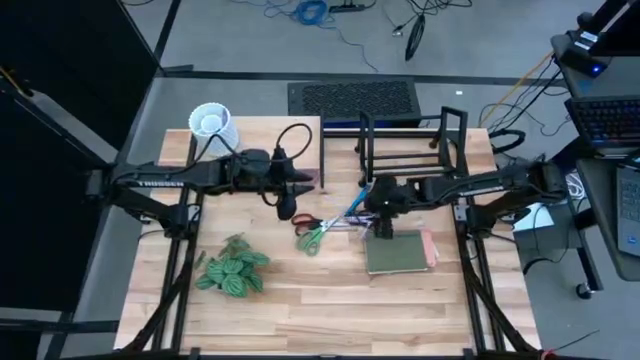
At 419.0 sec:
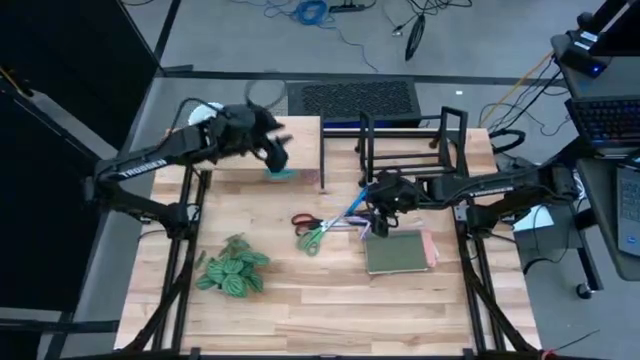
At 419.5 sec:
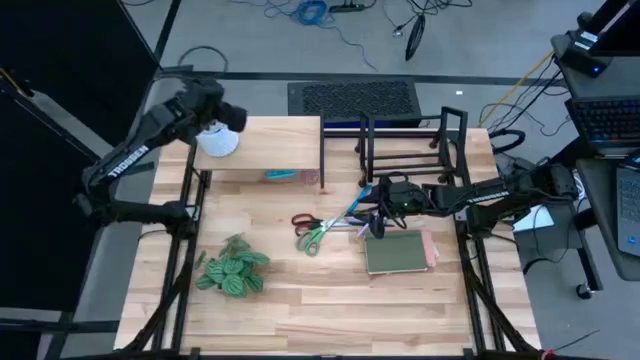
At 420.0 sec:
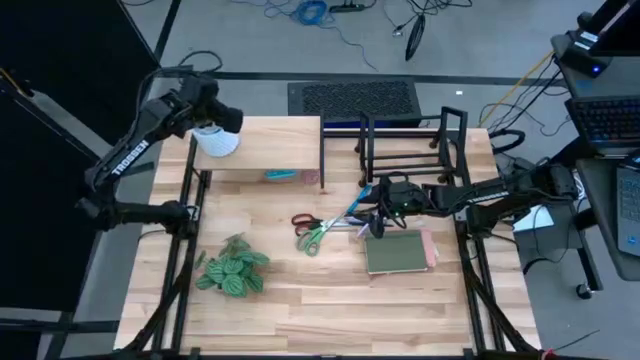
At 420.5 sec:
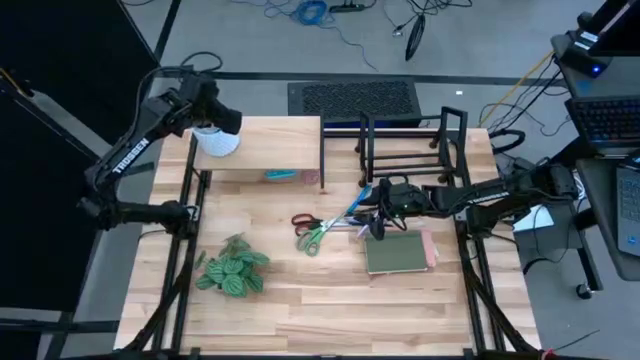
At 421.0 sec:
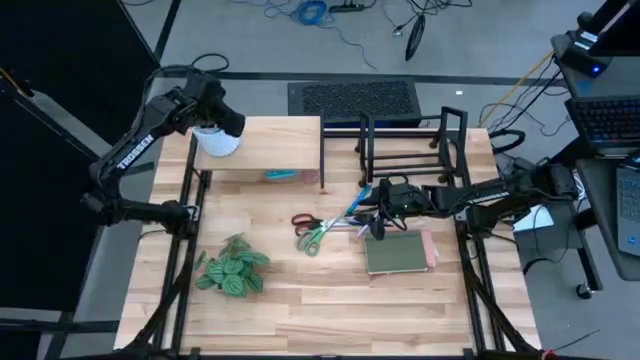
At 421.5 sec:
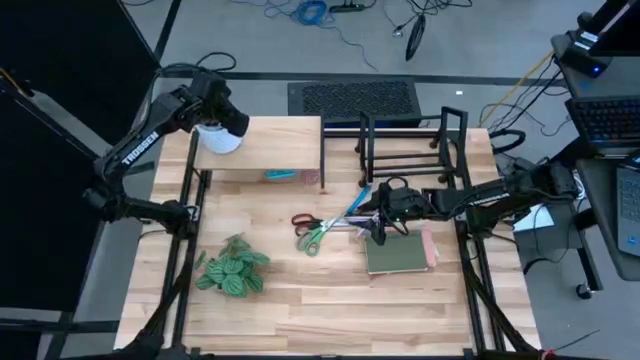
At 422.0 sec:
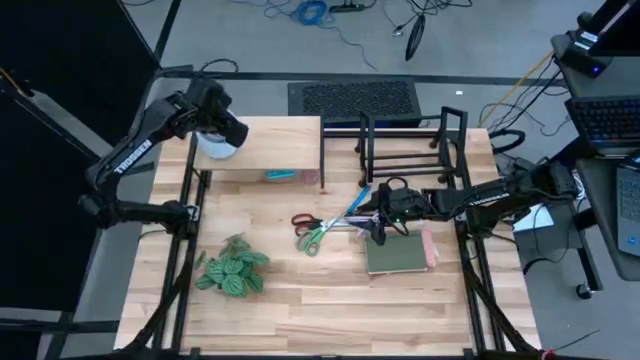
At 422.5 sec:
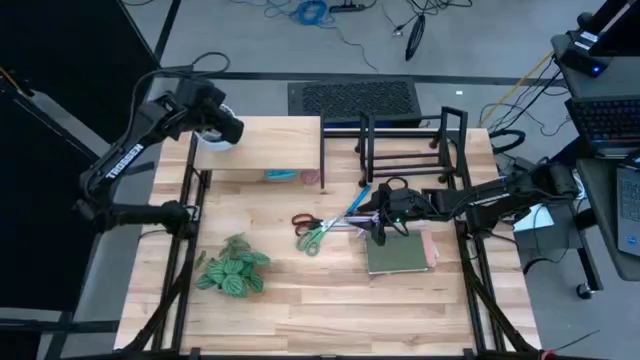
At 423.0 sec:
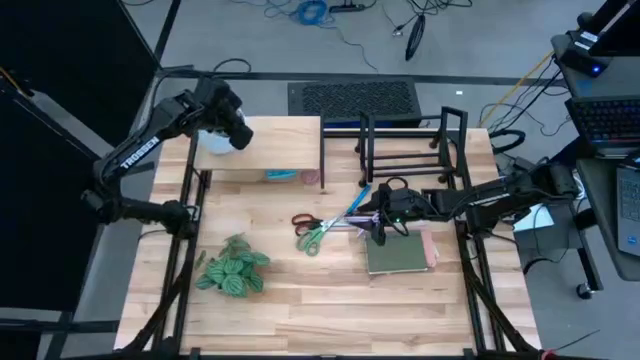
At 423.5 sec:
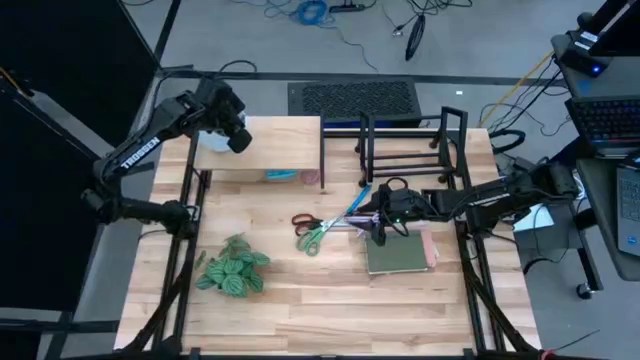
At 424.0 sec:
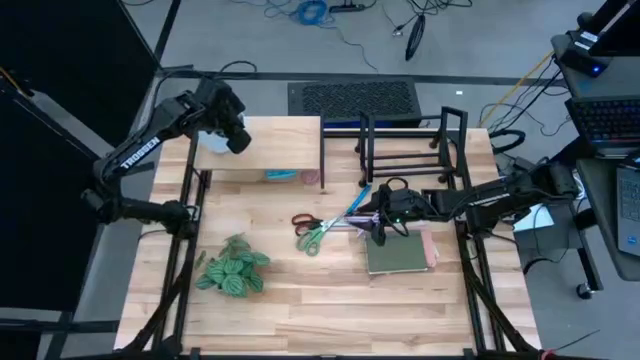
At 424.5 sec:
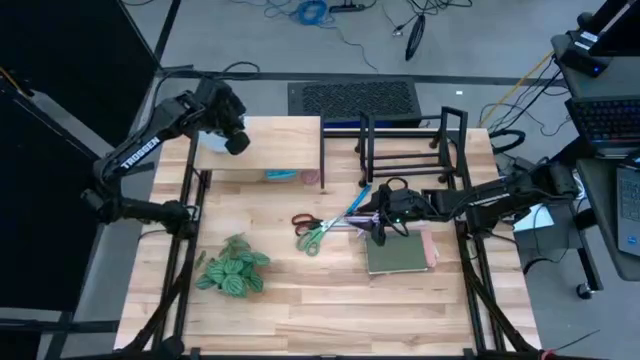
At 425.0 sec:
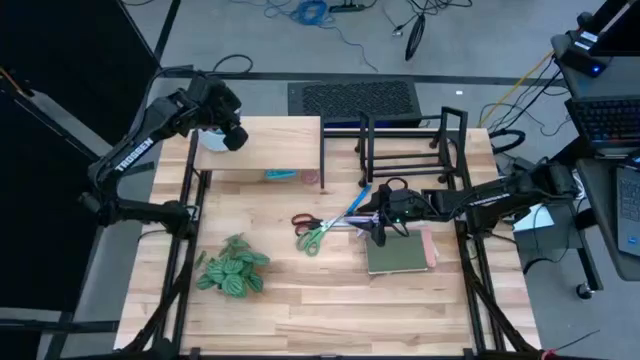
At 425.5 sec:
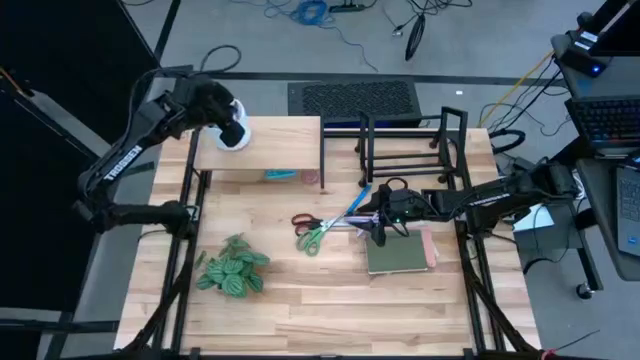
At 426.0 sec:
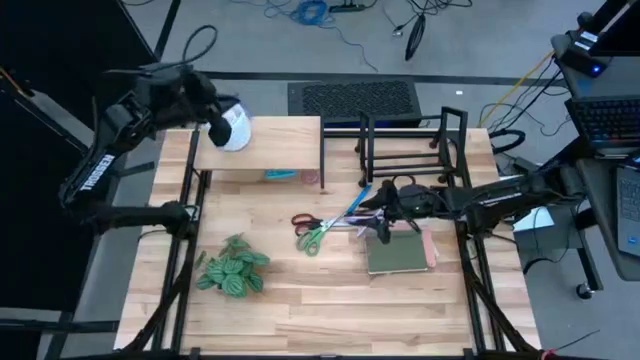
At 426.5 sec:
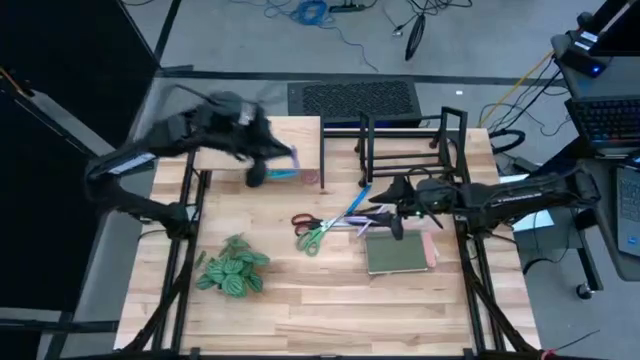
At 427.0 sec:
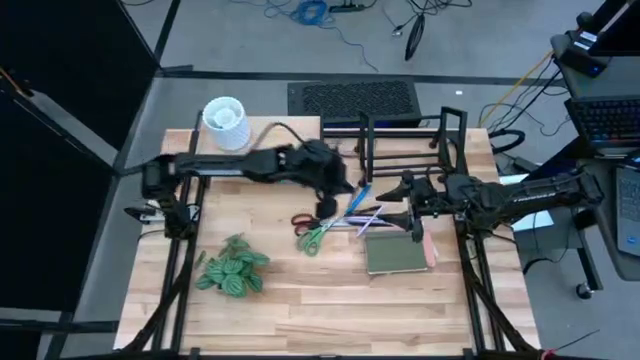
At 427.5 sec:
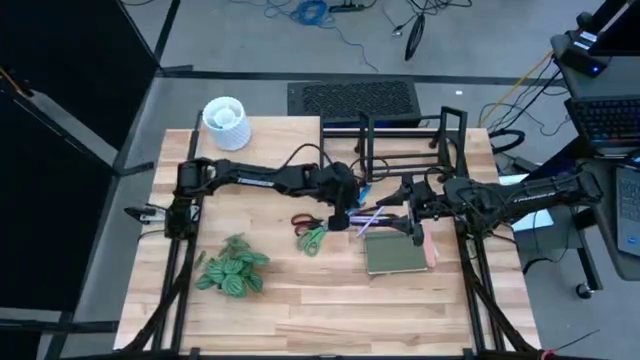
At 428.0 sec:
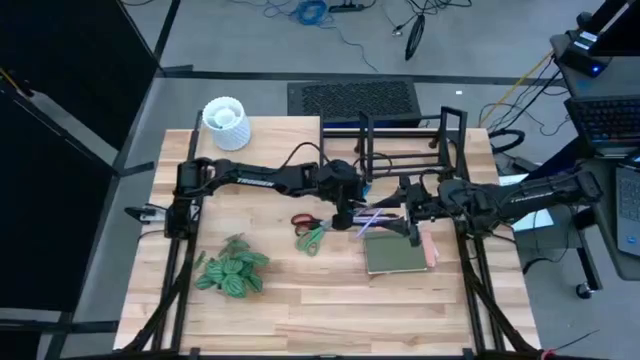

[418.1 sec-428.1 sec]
Task: Stock shelves
Remove the purple pen from the white pen holder

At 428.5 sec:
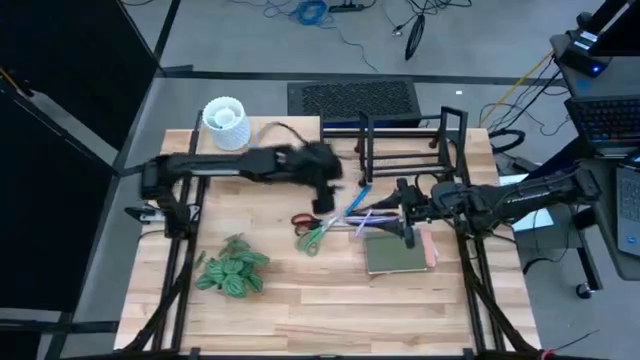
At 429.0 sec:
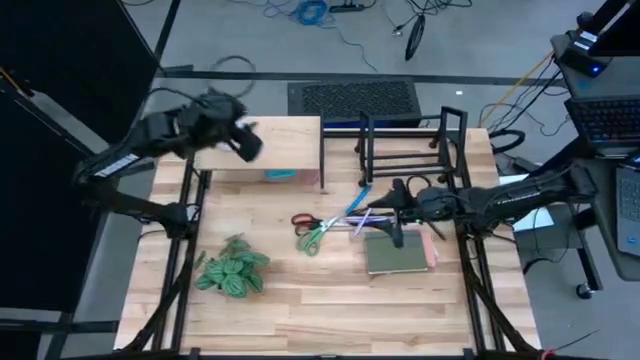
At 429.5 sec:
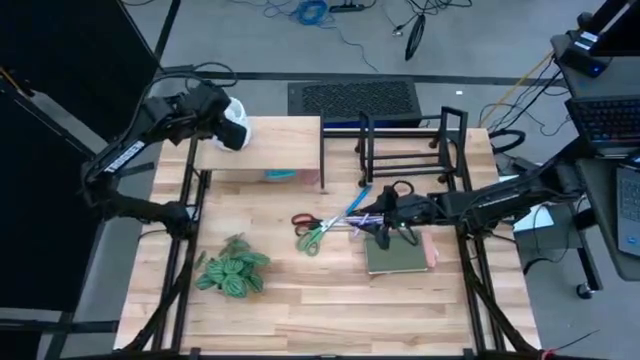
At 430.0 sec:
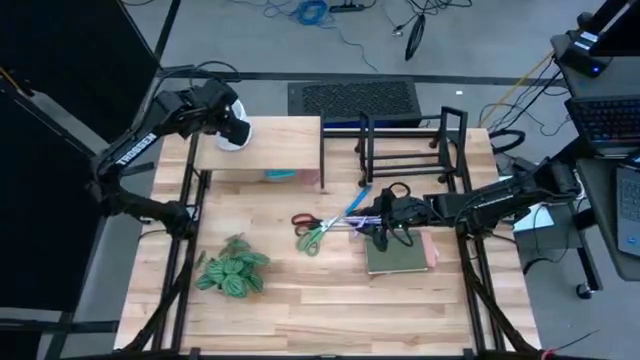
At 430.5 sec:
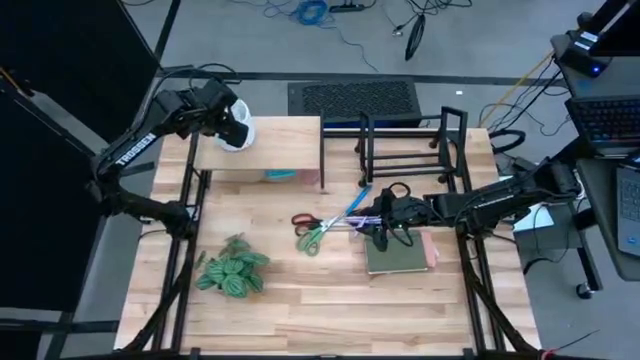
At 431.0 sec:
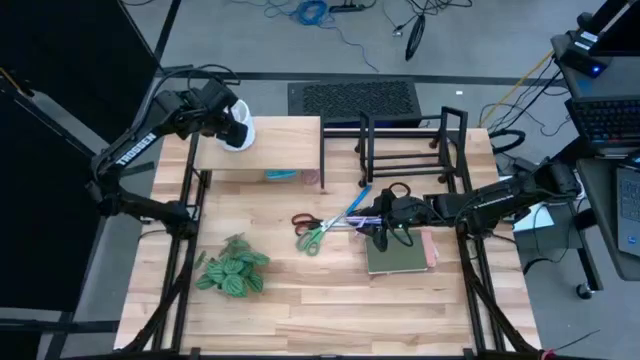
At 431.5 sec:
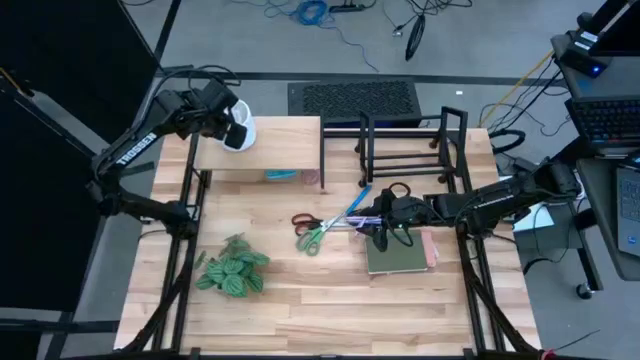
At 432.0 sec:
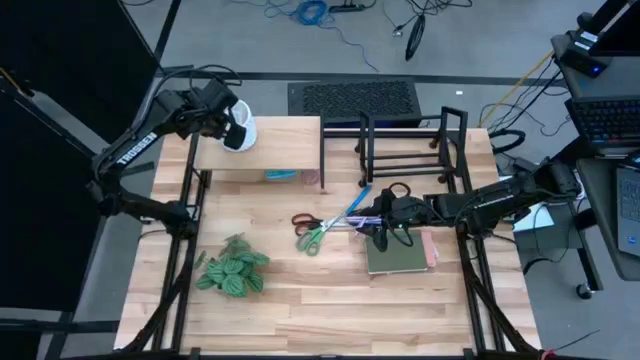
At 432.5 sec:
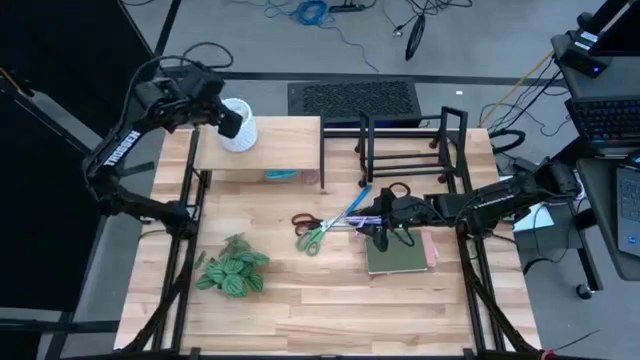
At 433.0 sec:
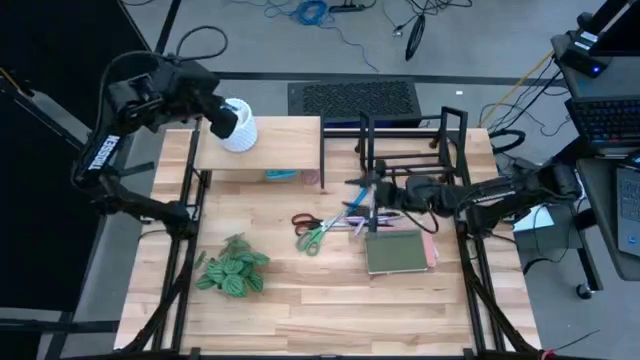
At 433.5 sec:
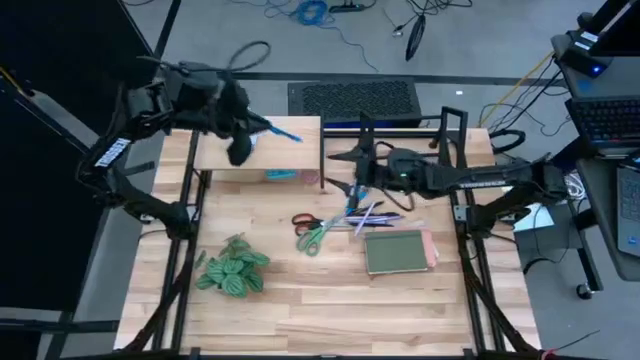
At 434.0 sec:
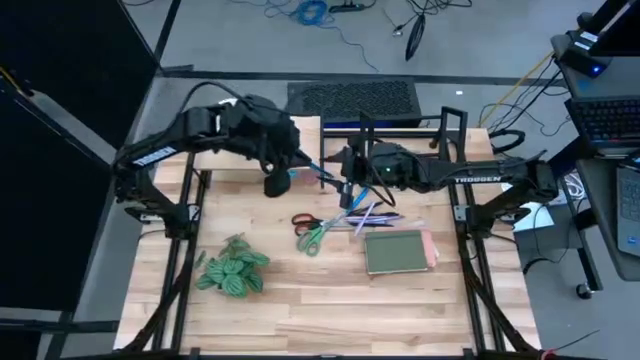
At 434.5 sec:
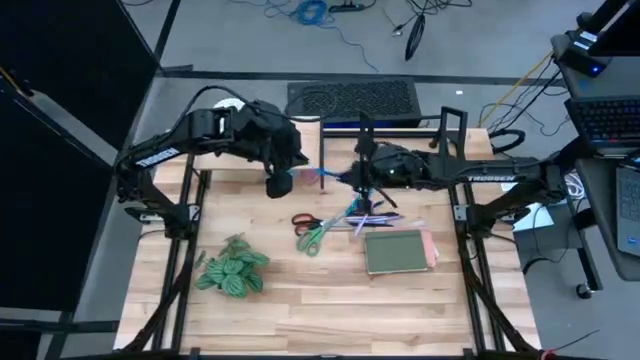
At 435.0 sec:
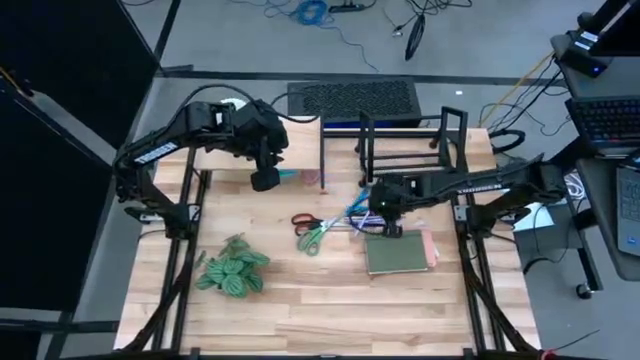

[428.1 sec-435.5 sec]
Remove the blue pen from the white pen holder

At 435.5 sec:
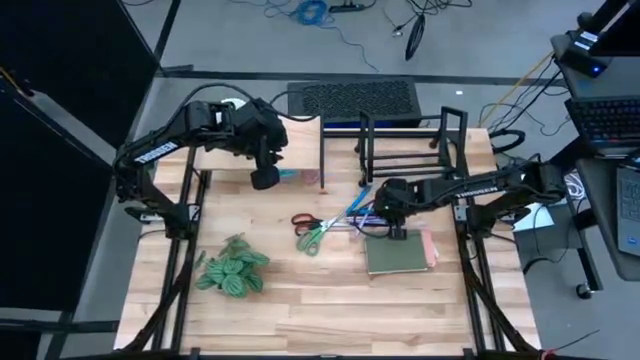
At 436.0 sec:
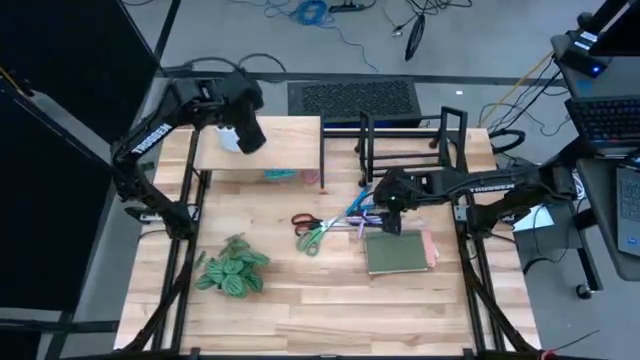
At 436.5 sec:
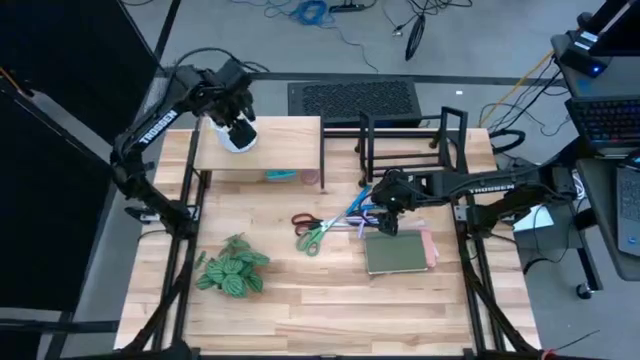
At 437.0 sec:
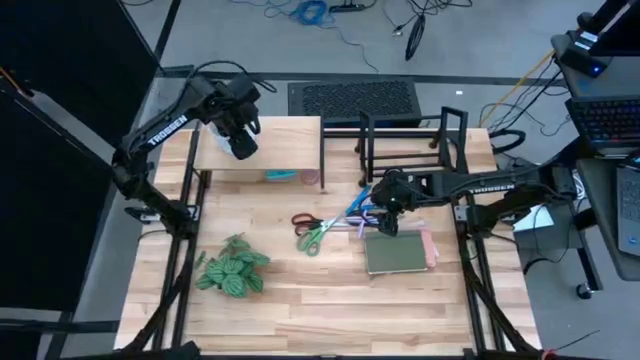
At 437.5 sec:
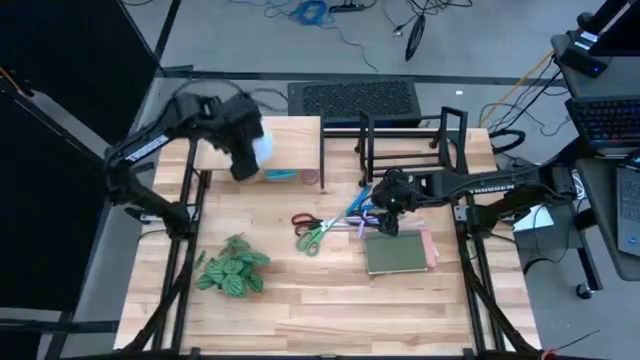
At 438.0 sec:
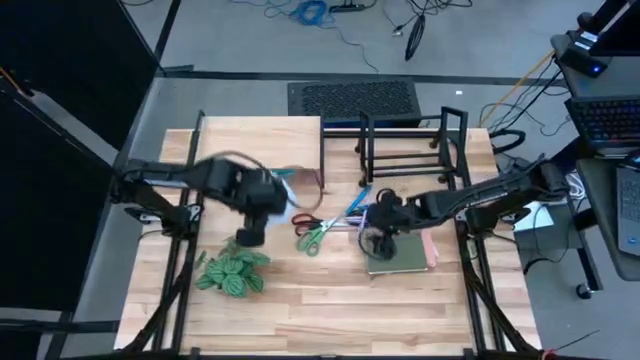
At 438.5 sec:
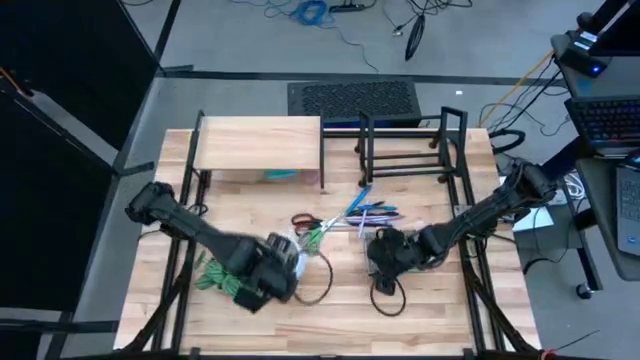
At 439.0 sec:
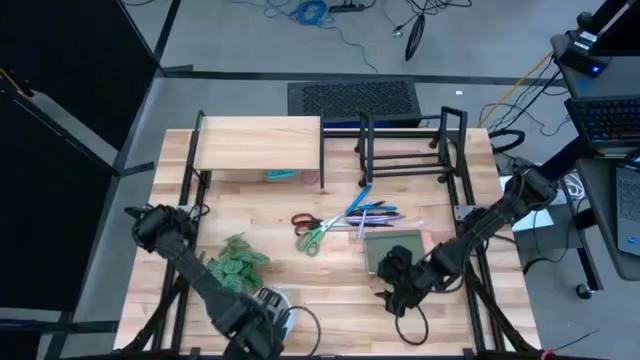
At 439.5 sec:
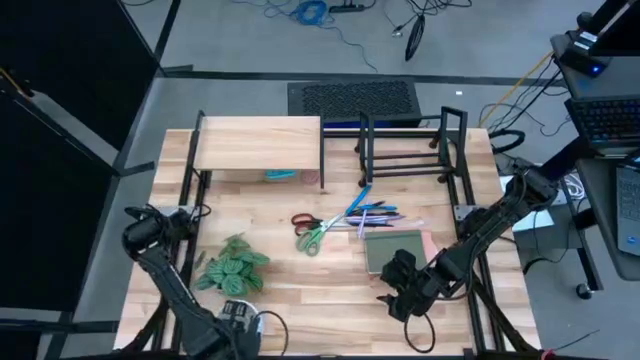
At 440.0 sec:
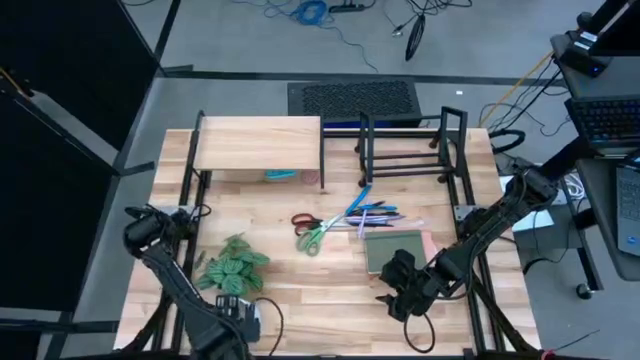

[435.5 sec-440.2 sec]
Remove the white pen holder from the shelf
